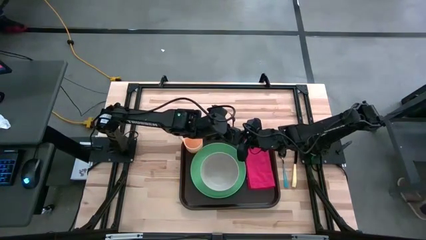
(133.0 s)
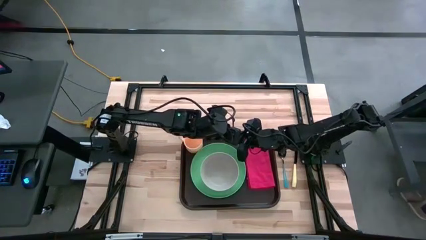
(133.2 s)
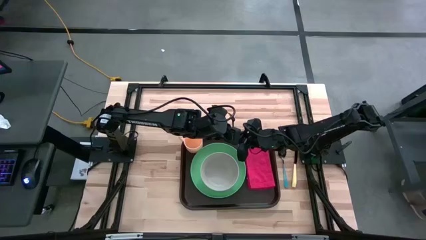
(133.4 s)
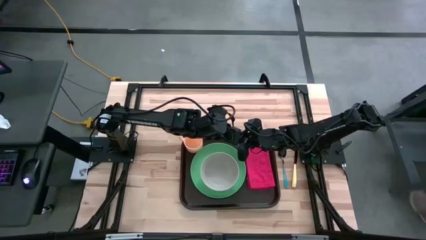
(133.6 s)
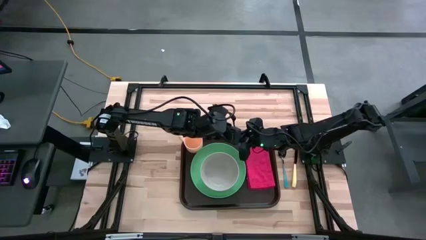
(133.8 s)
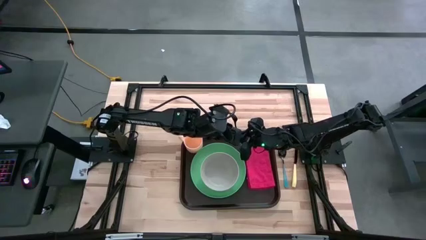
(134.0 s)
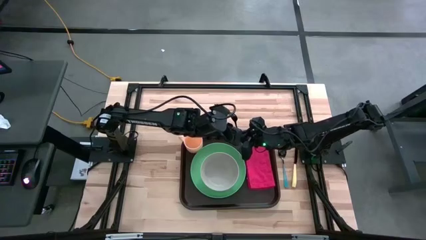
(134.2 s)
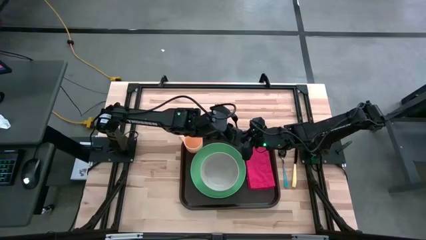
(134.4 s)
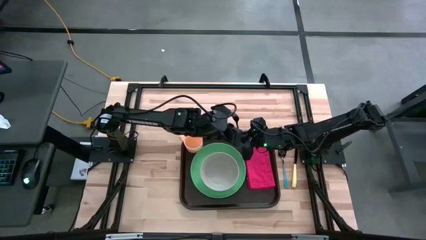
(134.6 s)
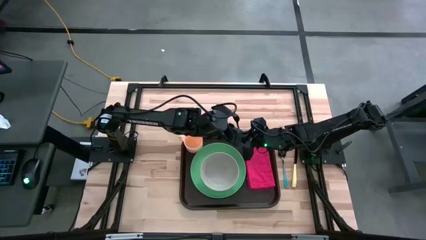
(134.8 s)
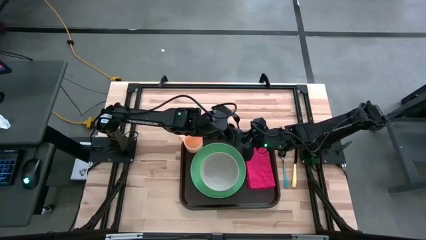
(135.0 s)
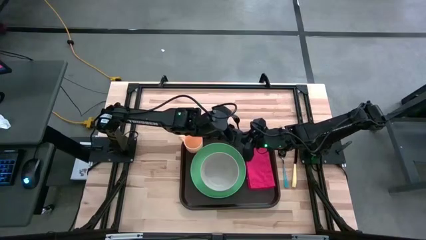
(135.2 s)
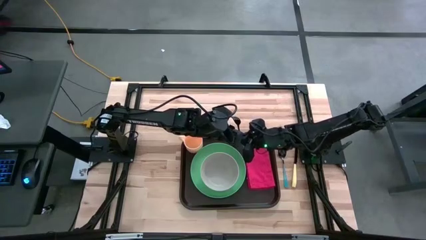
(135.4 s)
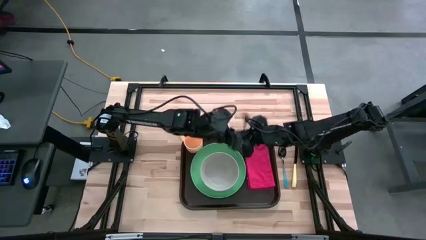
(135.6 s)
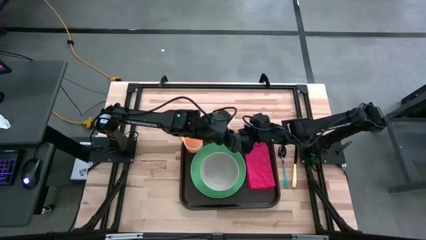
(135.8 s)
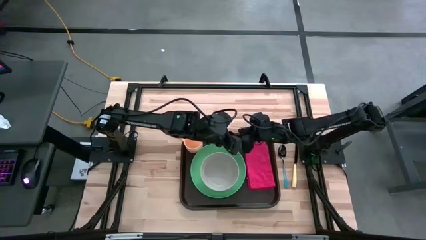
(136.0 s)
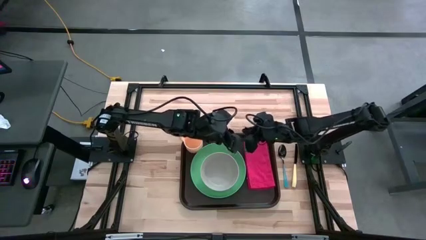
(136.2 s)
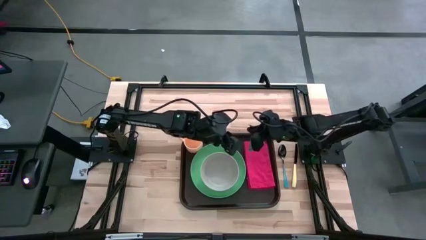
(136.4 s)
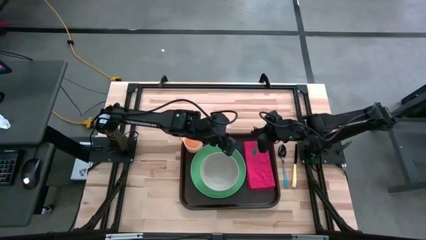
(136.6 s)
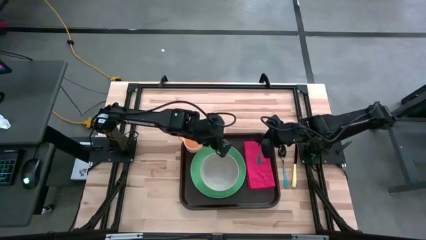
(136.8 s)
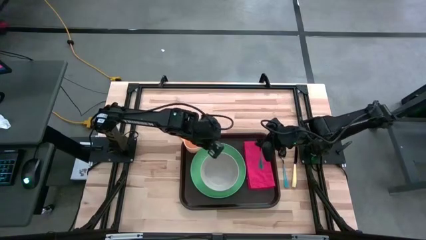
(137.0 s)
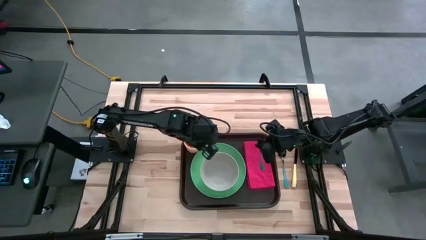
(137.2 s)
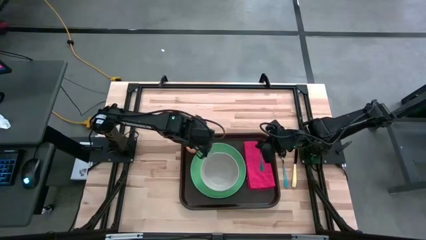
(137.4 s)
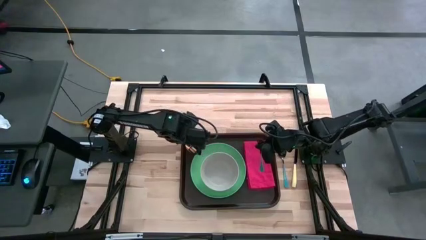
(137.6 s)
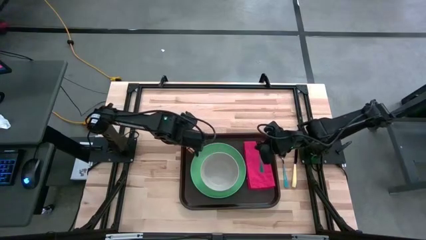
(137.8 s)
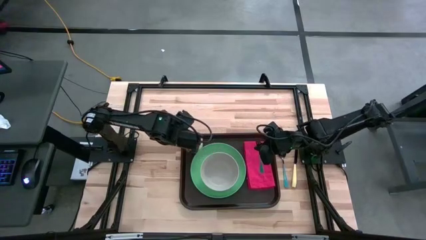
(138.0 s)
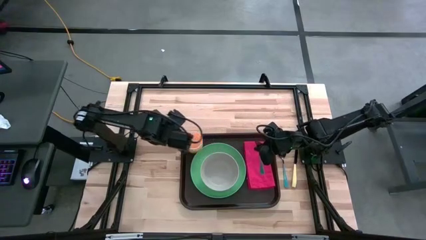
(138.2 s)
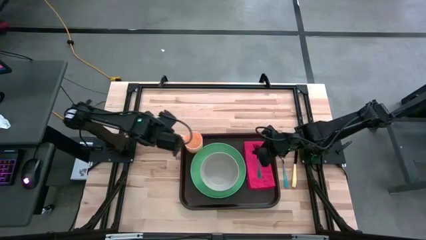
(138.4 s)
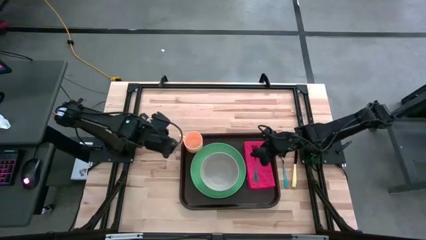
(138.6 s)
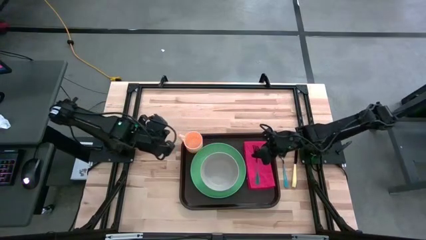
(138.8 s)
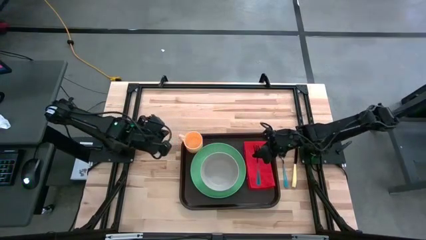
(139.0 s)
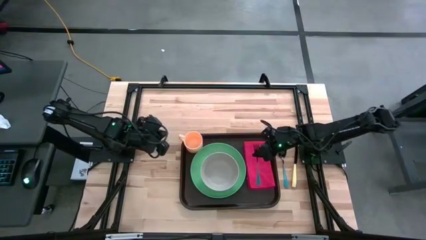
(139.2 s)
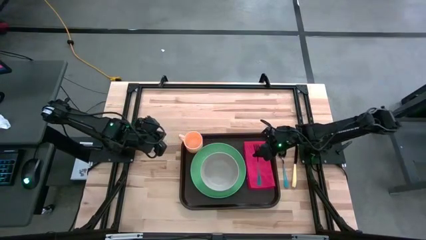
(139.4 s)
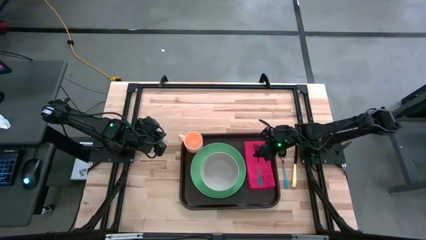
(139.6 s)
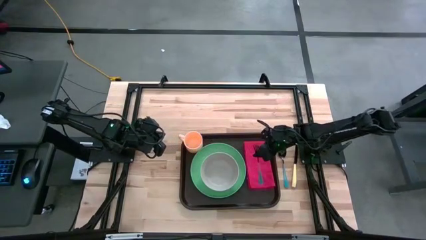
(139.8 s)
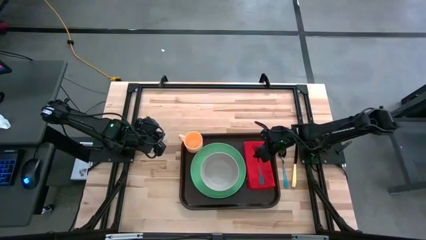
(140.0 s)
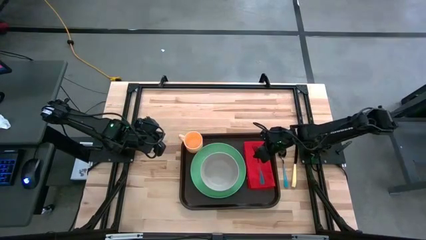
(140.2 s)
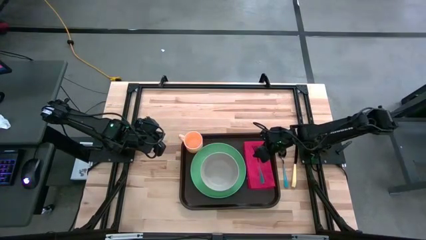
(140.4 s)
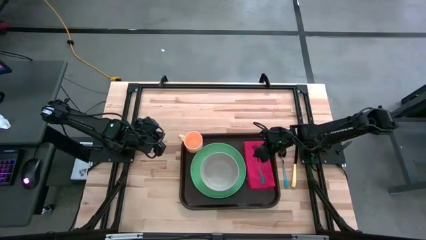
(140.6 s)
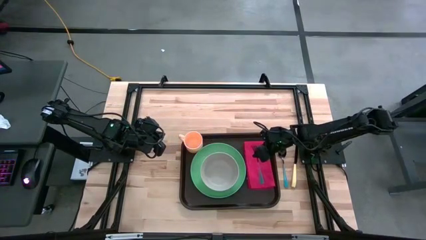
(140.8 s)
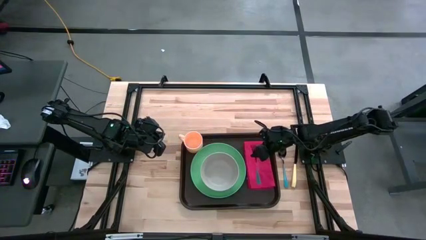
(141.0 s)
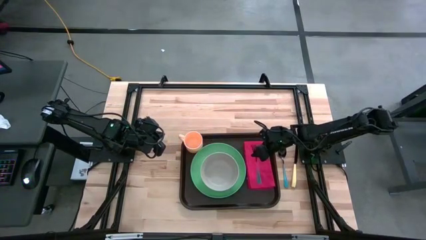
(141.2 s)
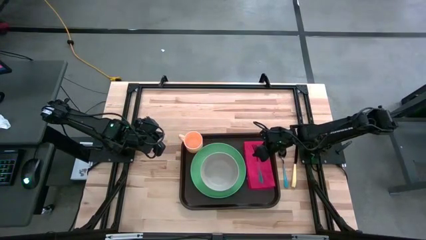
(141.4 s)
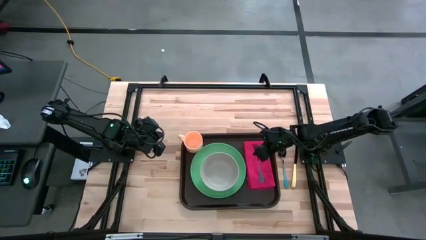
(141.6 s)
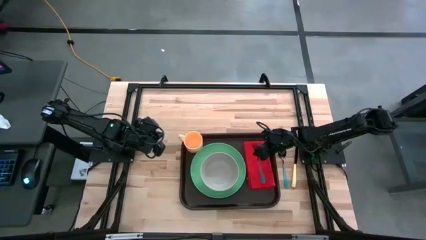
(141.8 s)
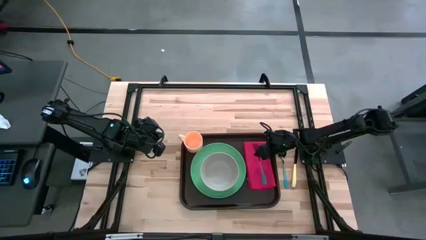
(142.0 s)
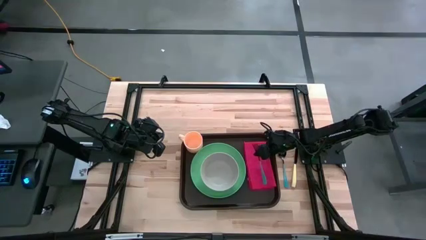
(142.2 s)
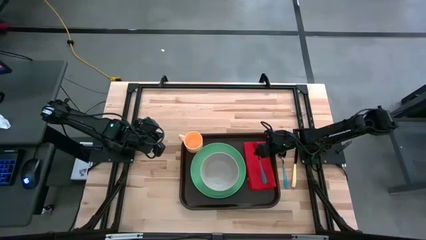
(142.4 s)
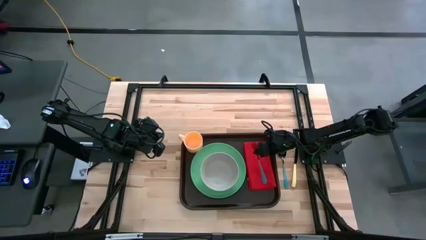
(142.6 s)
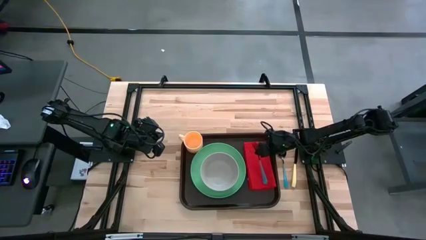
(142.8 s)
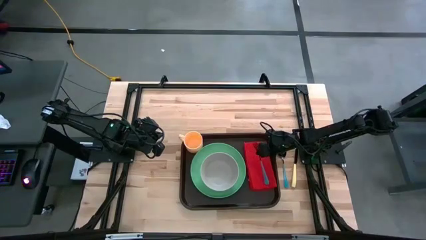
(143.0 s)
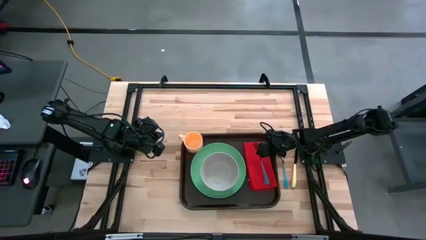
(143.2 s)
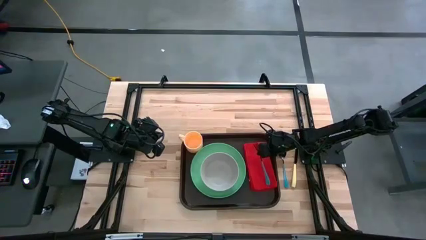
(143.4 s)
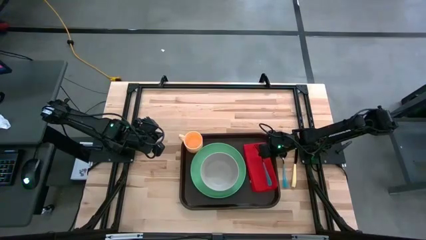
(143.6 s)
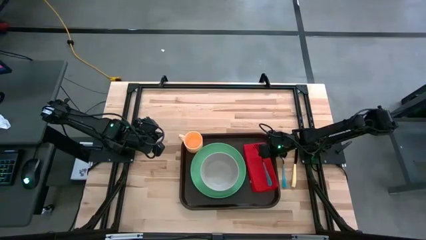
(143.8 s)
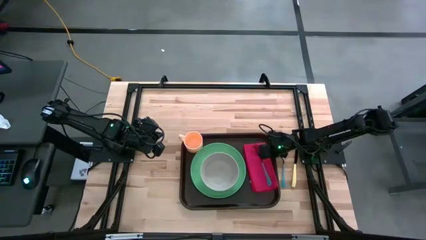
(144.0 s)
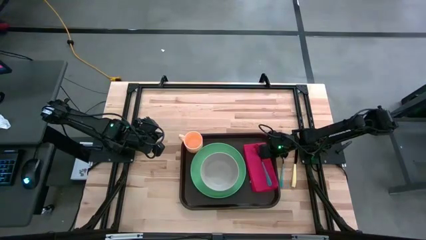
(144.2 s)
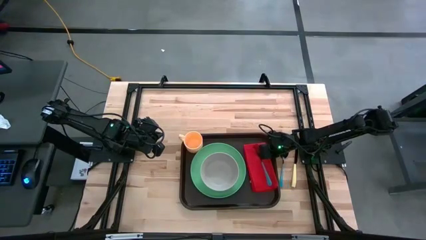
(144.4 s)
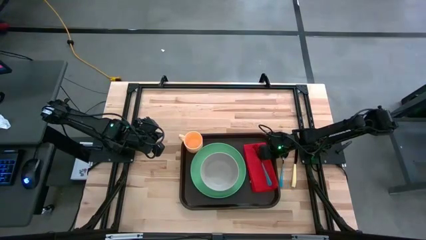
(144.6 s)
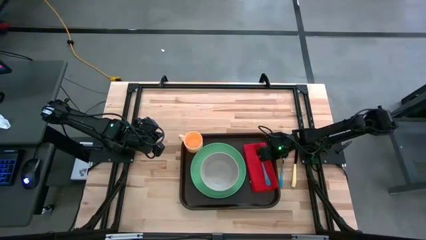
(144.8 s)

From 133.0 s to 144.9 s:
Task: Set up tray
Put the fork on top of the table napkin on the serving tray

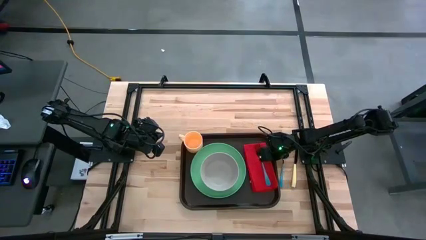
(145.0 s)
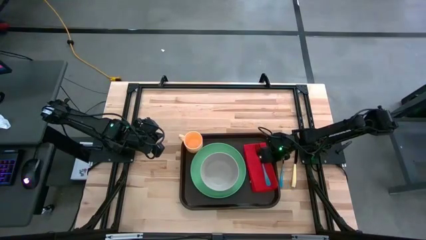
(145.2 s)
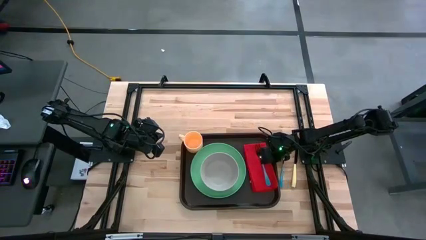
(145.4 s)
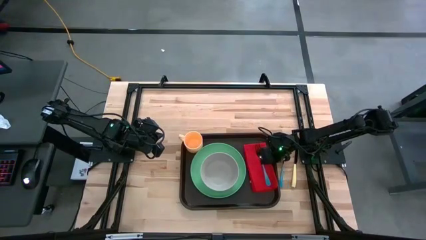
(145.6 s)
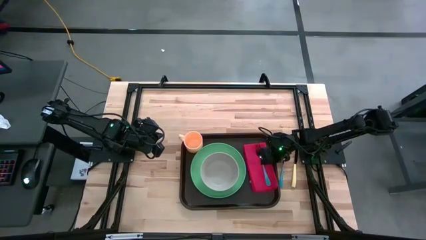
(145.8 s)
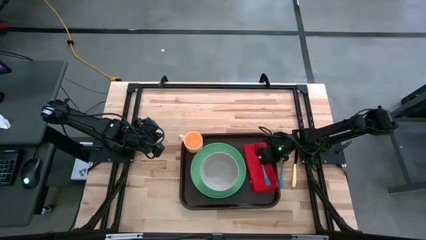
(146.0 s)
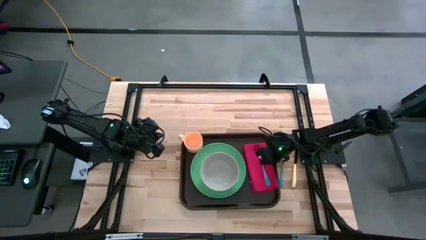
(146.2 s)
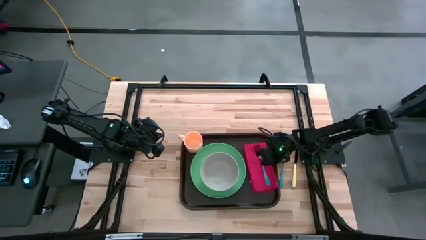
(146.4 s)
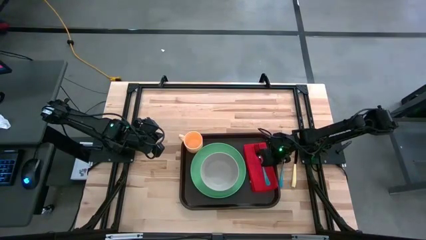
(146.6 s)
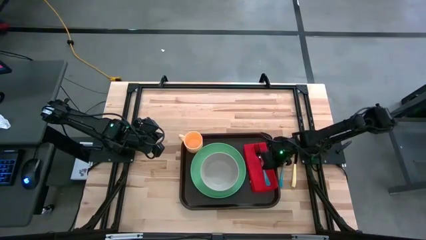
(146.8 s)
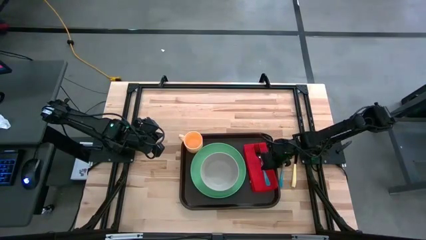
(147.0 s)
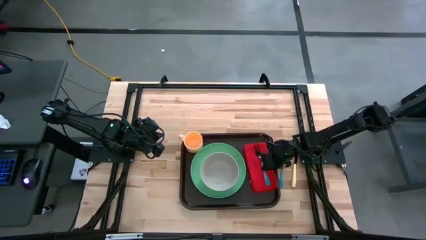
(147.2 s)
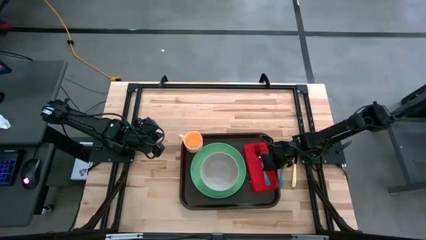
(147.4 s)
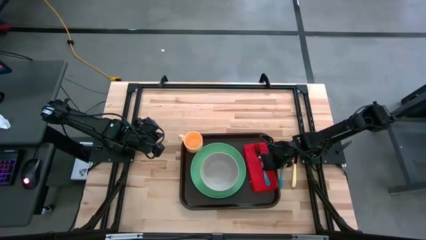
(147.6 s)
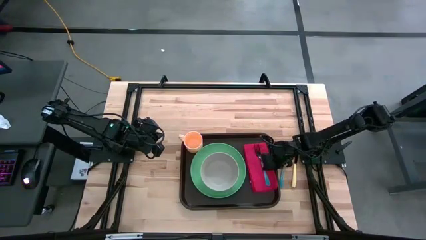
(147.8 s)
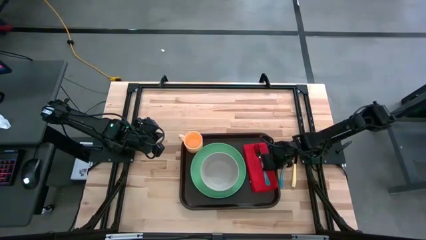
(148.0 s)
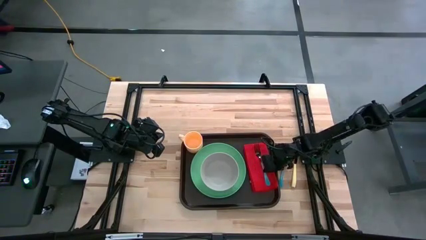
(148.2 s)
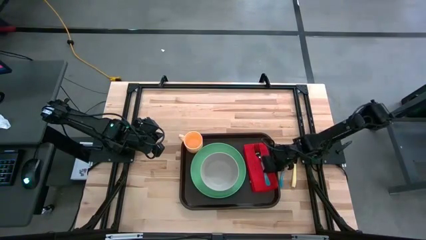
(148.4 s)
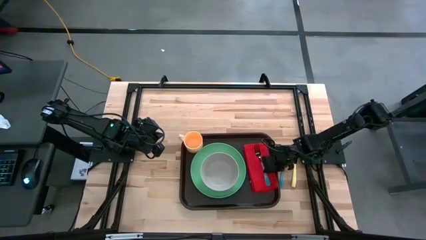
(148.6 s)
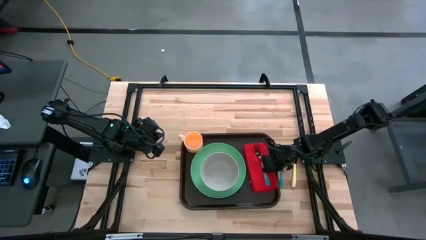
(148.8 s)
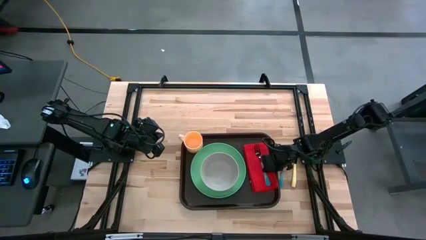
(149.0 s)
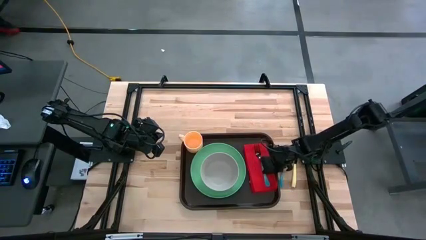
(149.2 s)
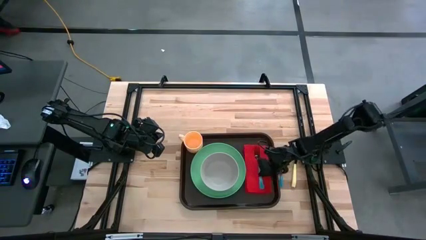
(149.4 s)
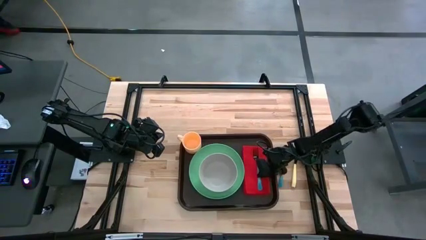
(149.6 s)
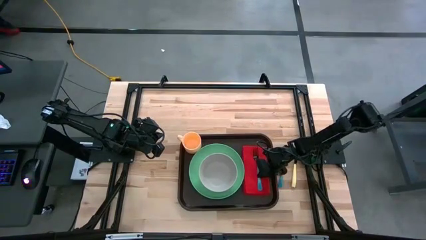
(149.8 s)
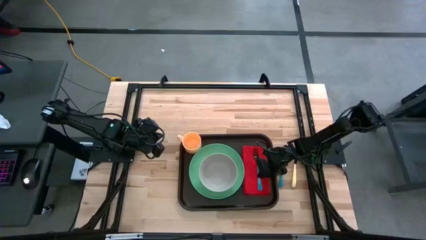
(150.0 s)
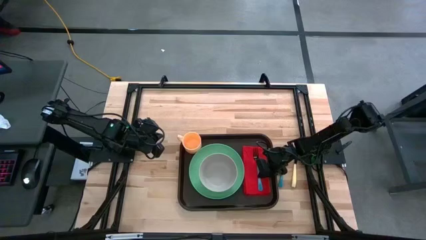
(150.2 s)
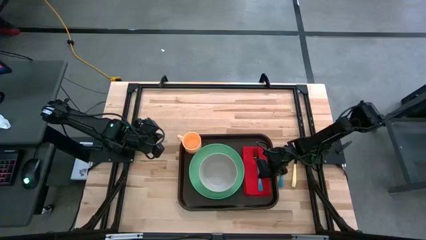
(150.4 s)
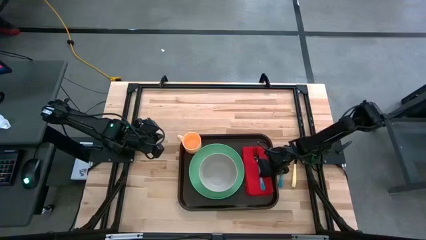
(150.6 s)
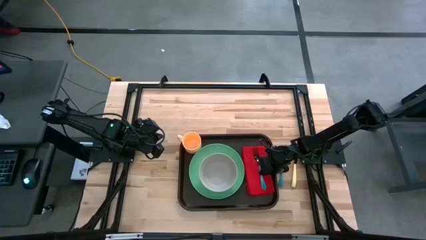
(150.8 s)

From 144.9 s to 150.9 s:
Adjust the table napkin on the serving tray
